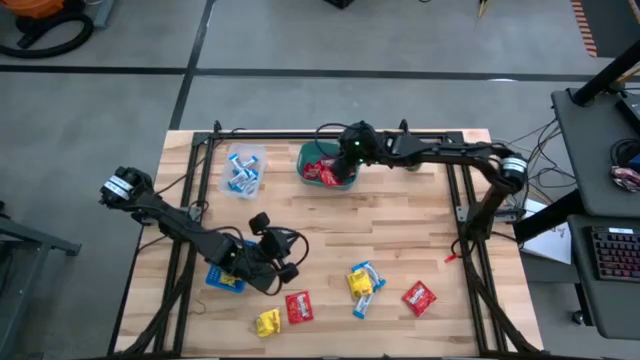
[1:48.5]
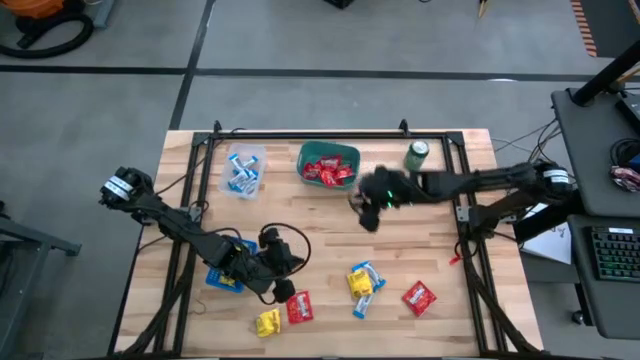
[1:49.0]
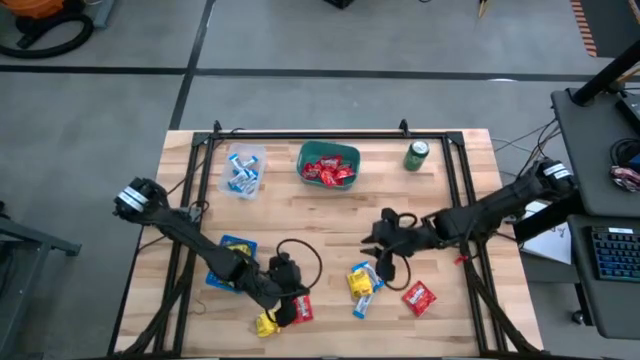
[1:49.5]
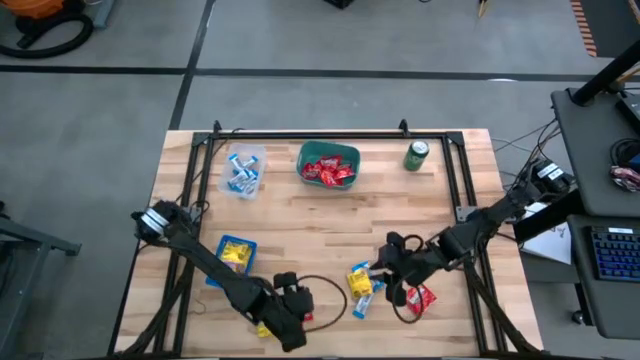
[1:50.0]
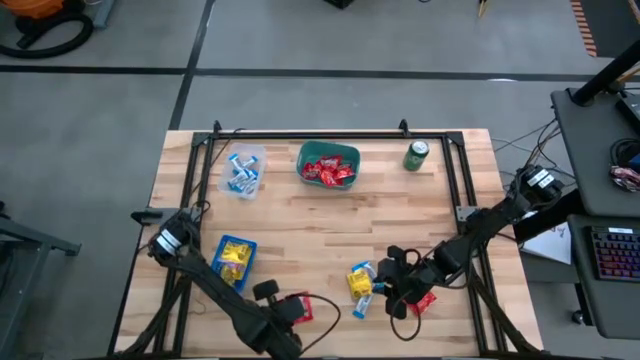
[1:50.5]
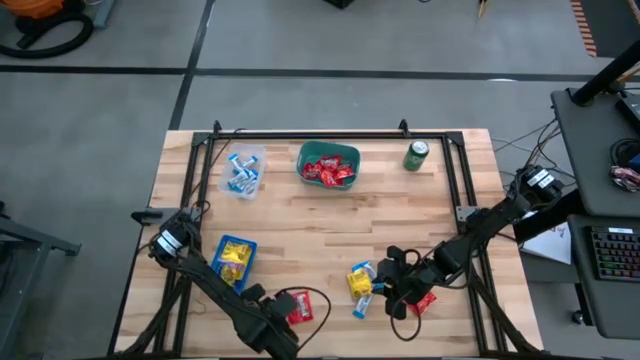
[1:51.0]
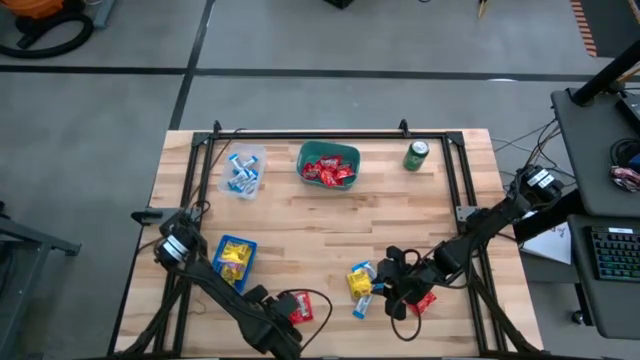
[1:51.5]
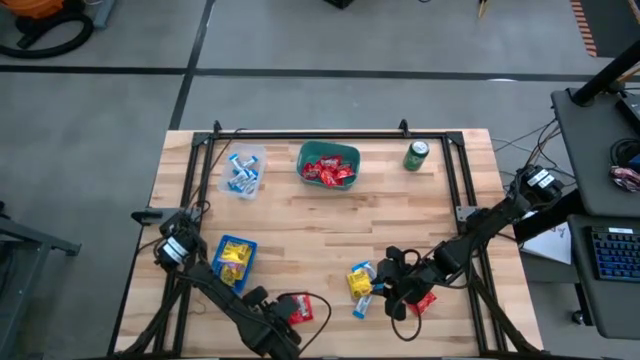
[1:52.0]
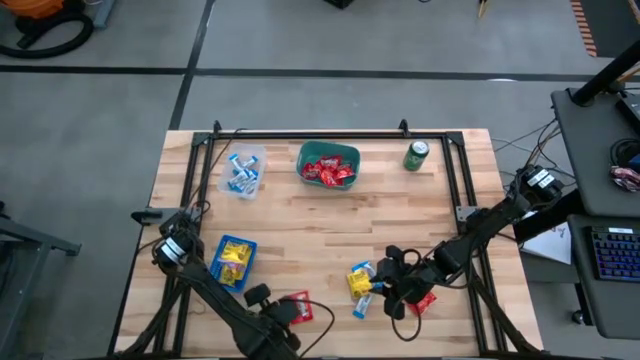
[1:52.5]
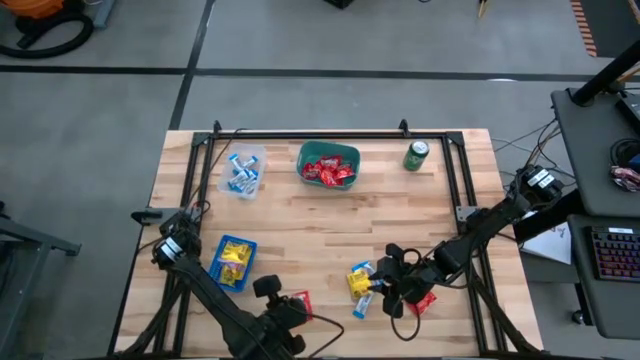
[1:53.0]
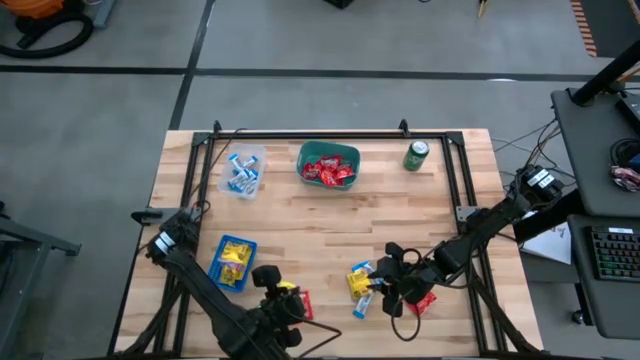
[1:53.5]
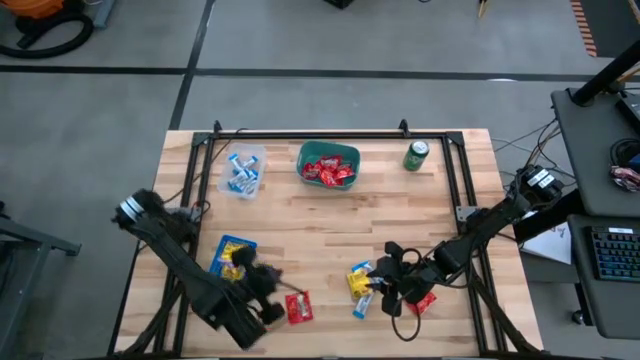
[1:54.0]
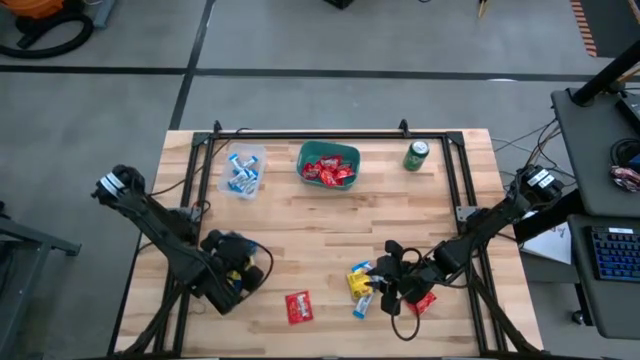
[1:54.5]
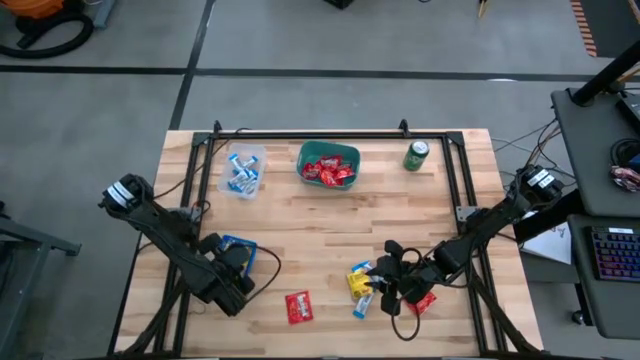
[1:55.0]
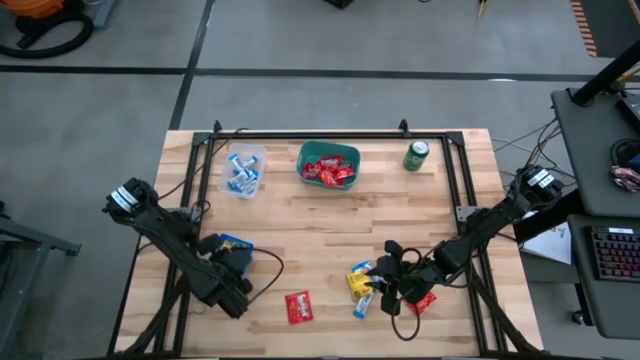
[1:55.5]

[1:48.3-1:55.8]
Task: Sort candy
Put the yellow candy into the blue basket

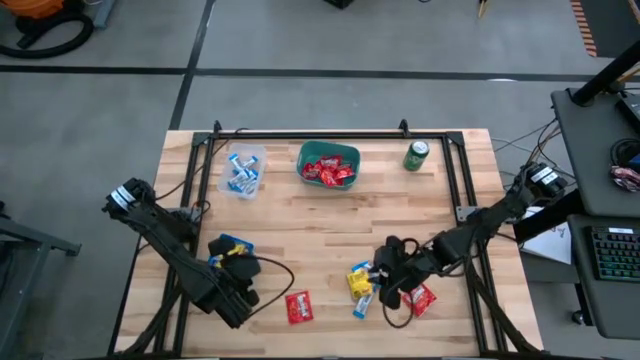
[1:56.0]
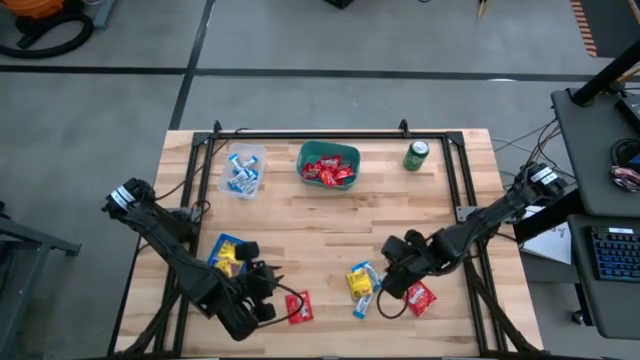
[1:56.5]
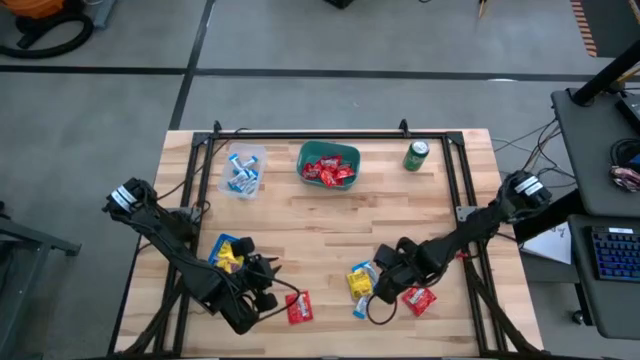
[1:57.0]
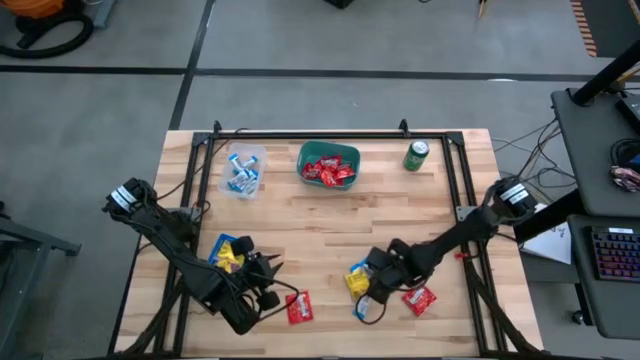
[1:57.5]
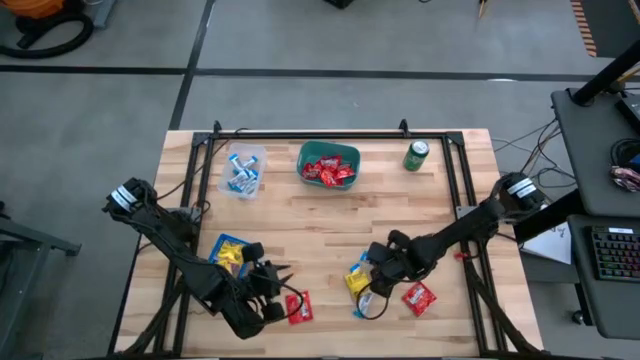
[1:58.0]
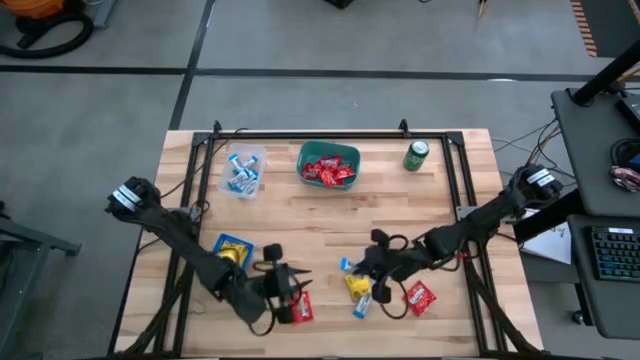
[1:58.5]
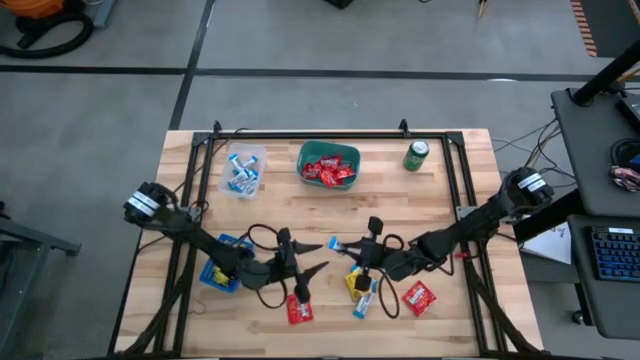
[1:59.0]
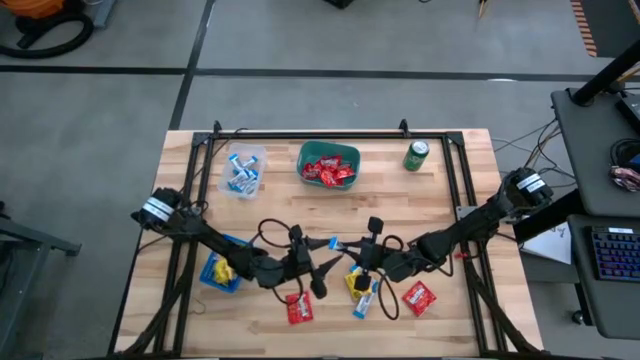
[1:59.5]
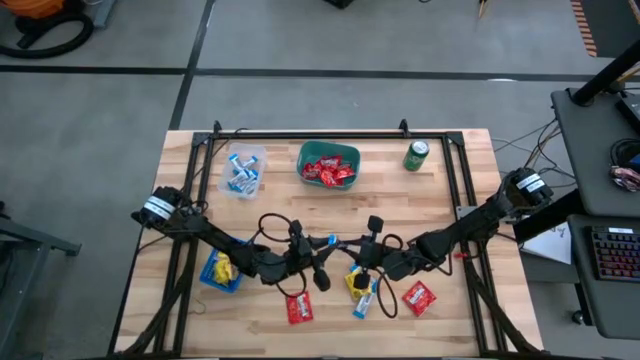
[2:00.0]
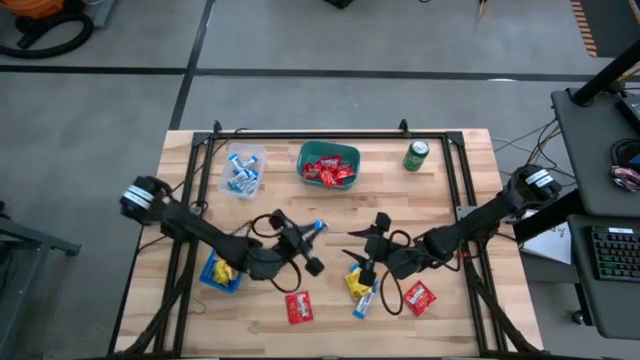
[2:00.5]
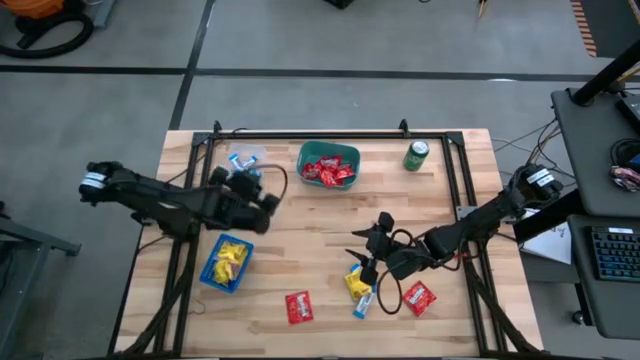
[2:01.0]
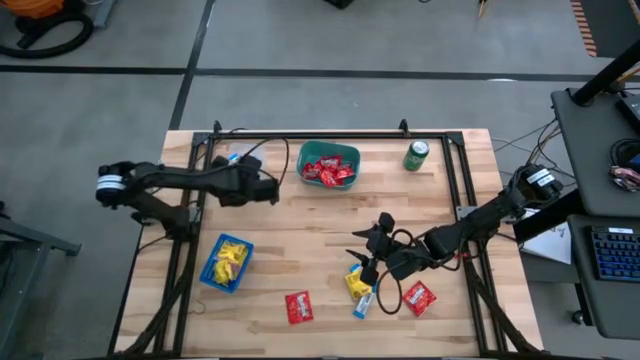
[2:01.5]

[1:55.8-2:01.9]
Put the white candy into the transparent bin

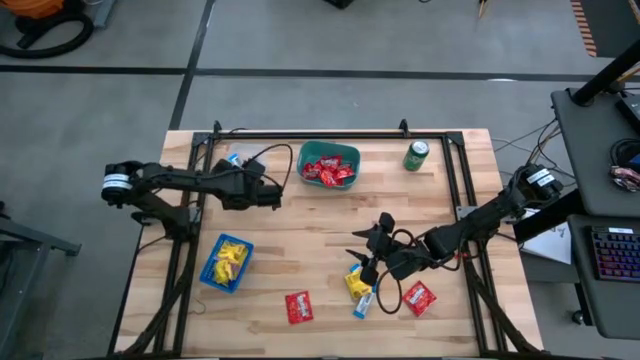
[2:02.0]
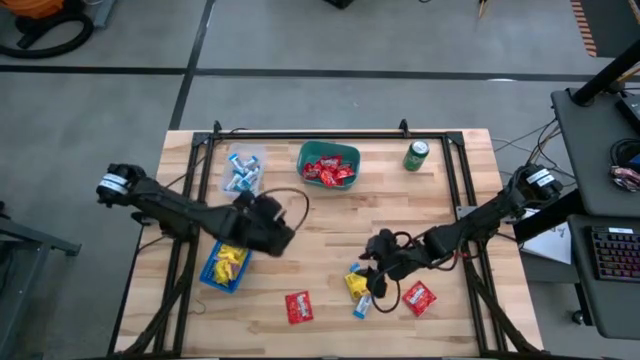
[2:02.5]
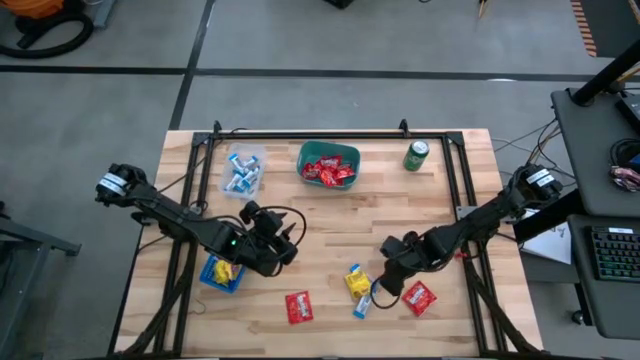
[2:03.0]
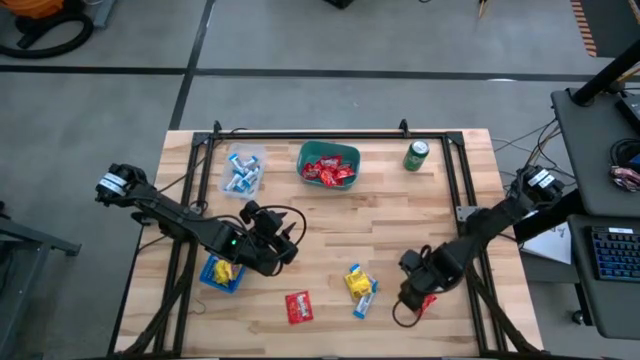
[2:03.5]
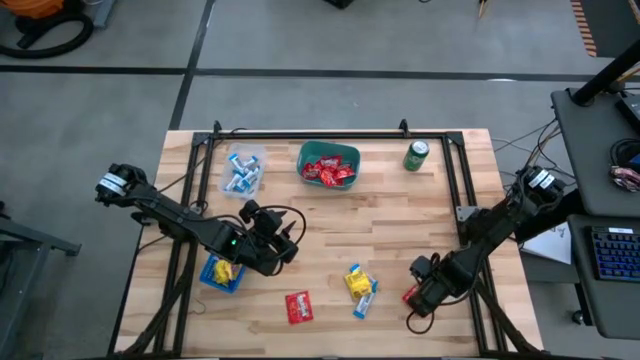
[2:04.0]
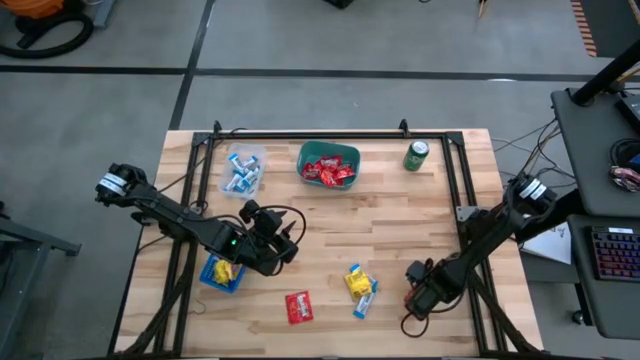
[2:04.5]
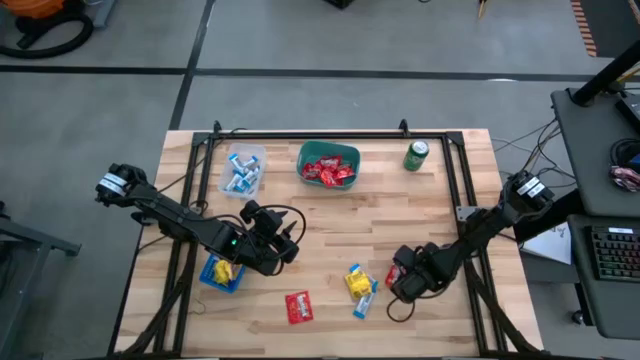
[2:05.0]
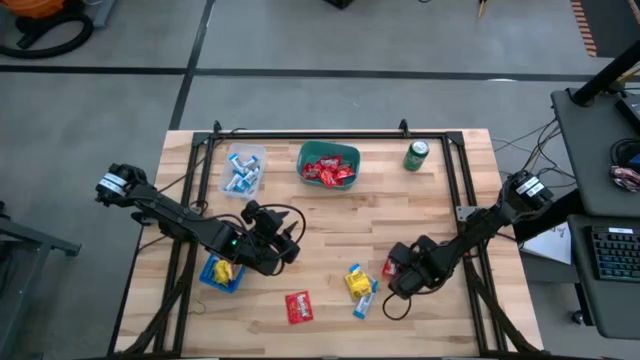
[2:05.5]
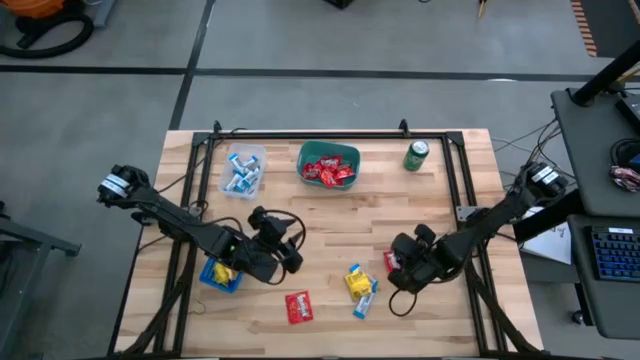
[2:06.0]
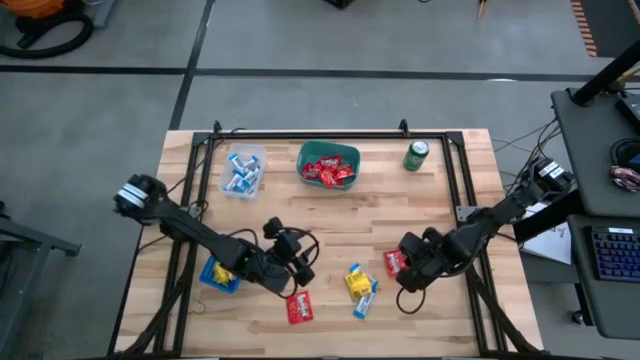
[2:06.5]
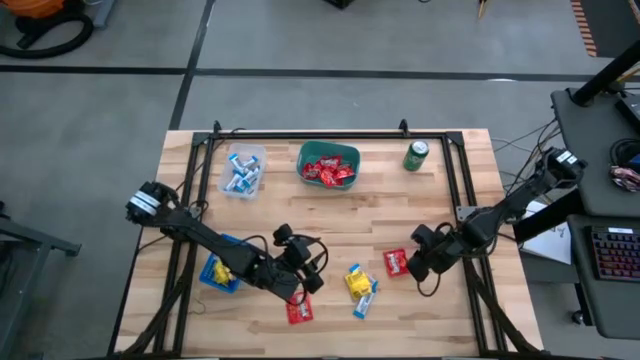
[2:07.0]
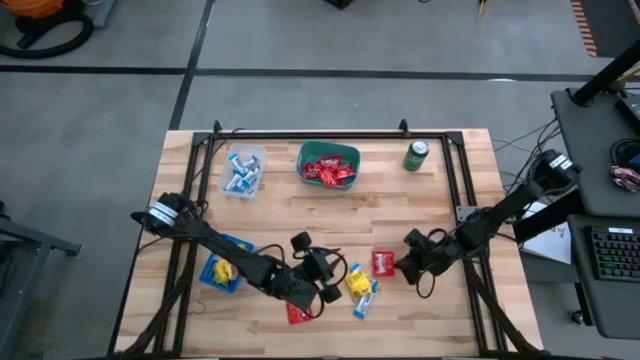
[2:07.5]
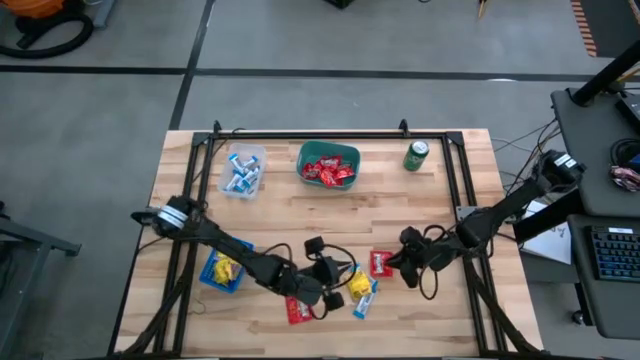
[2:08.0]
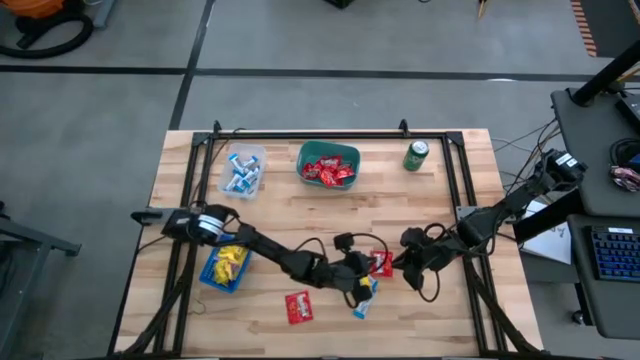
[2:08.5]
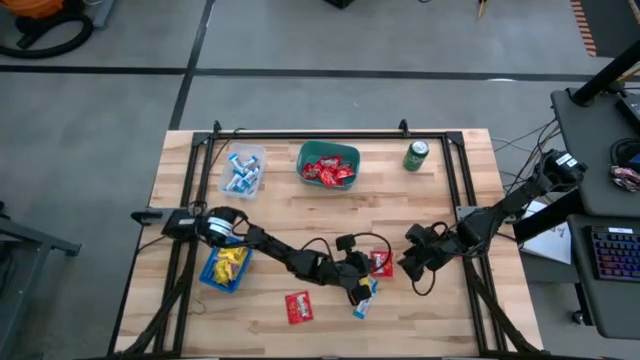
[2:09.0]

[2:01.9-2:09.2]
Put the red candy into the green bin
